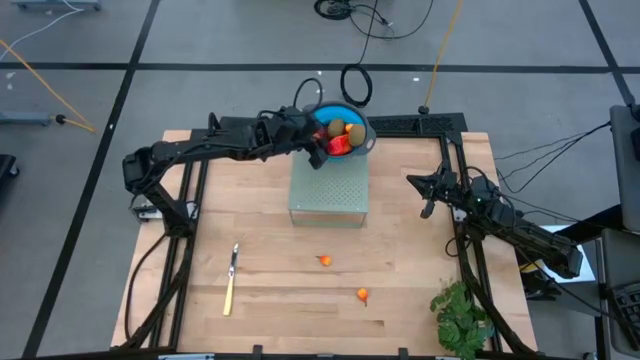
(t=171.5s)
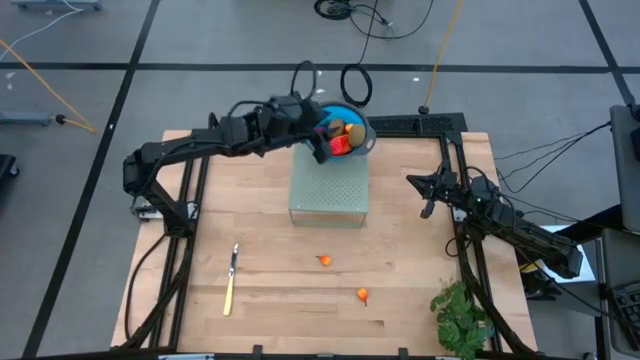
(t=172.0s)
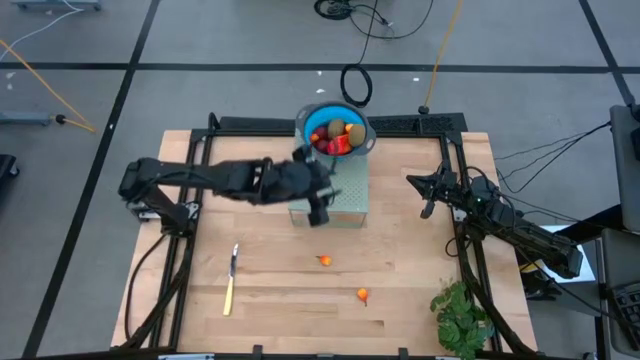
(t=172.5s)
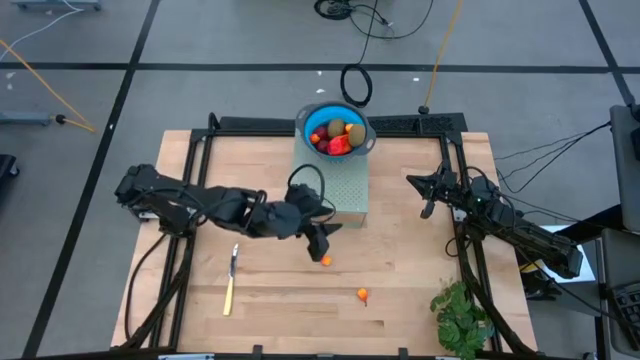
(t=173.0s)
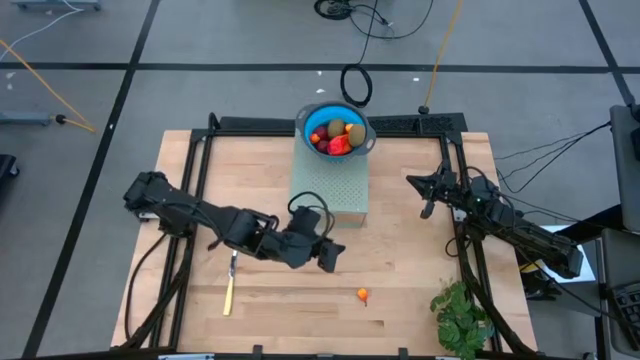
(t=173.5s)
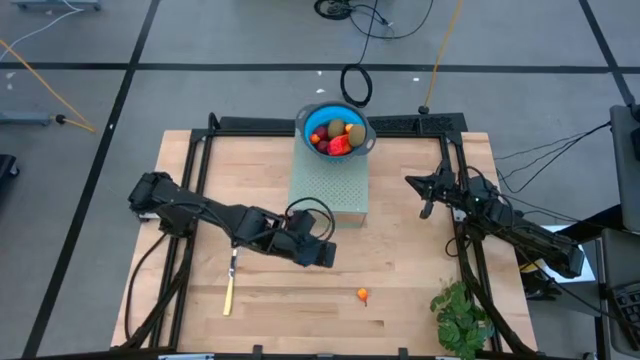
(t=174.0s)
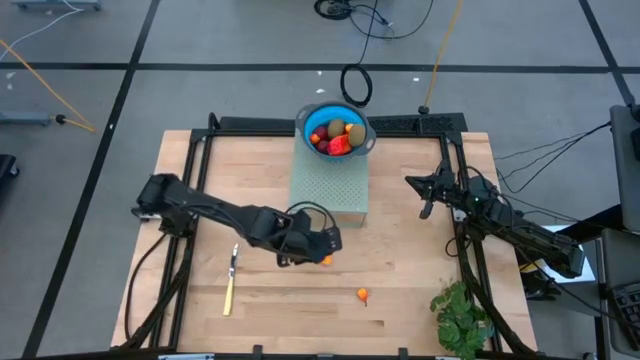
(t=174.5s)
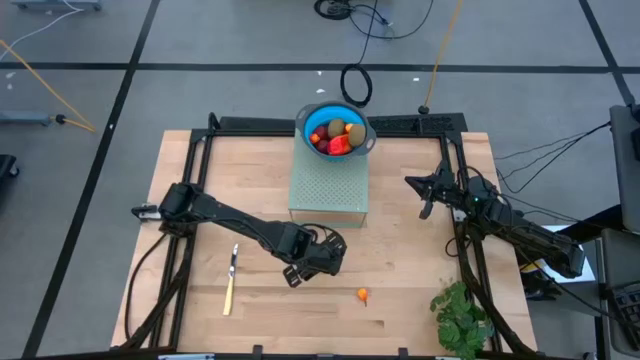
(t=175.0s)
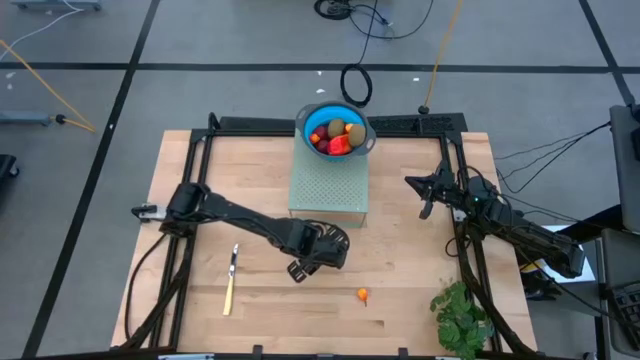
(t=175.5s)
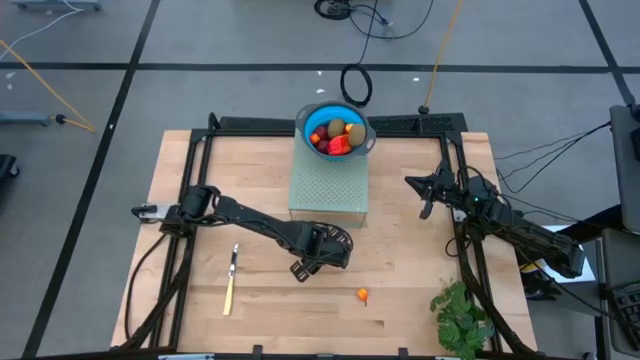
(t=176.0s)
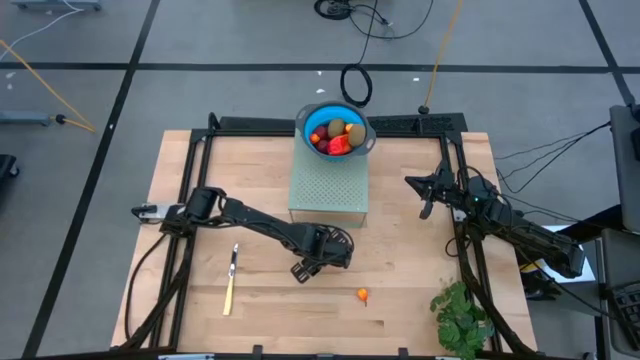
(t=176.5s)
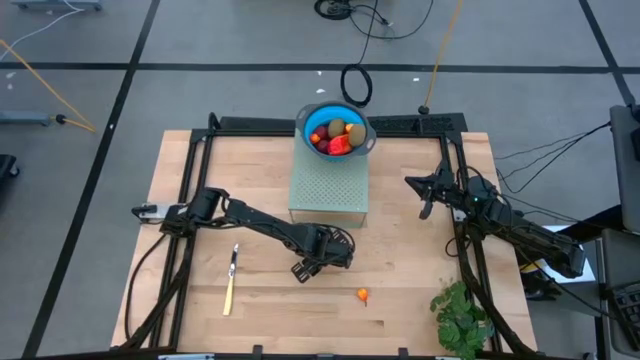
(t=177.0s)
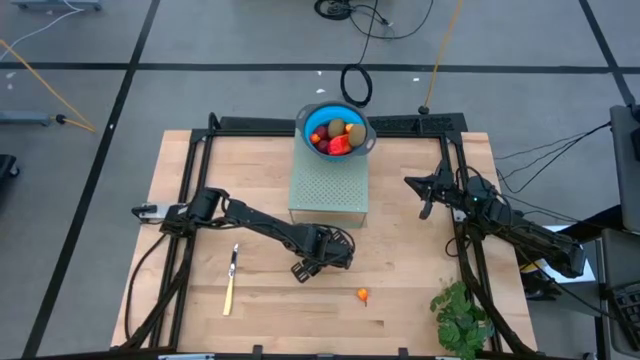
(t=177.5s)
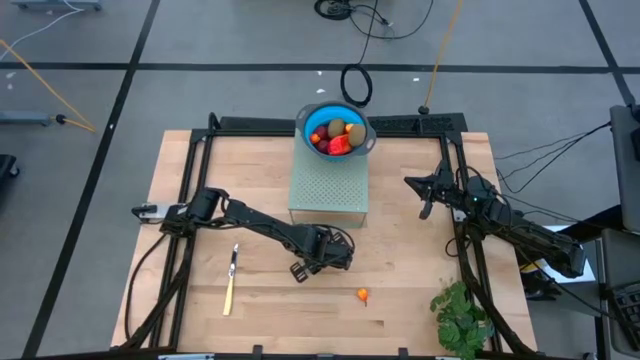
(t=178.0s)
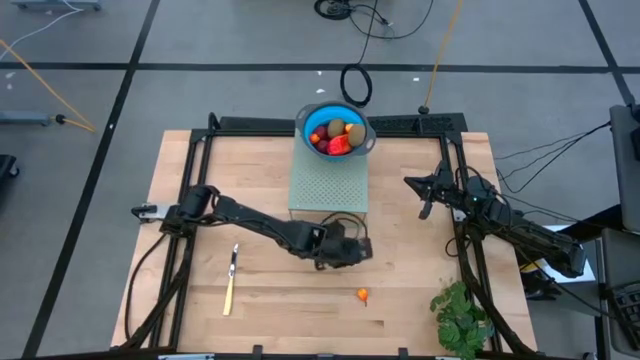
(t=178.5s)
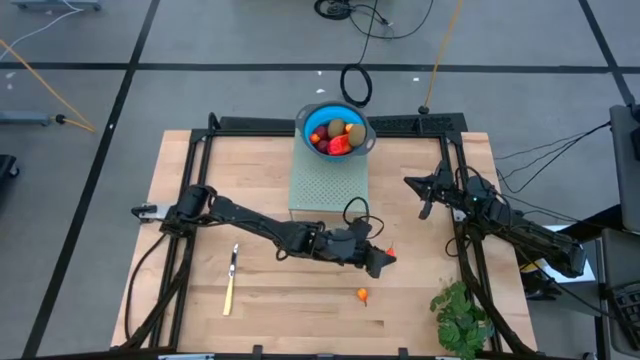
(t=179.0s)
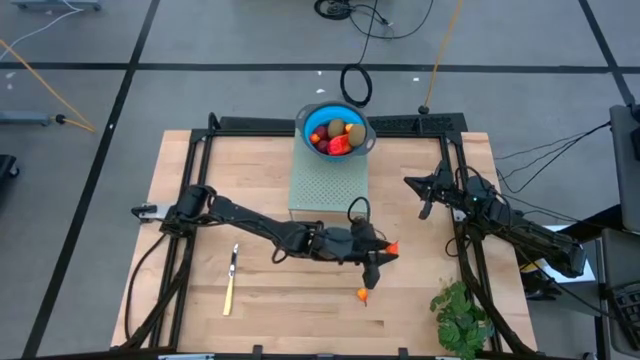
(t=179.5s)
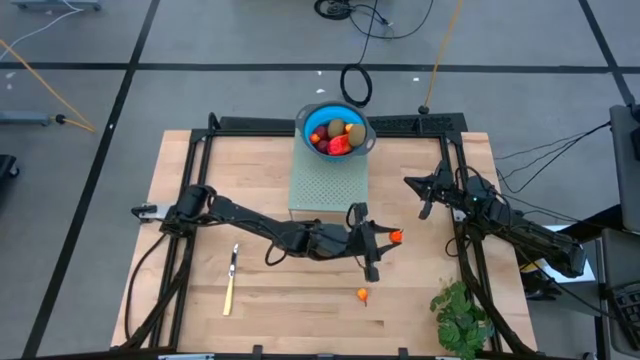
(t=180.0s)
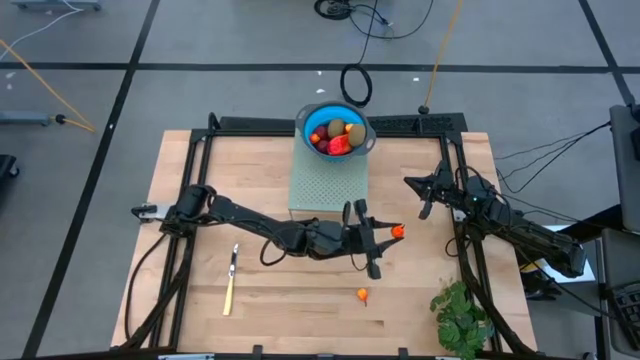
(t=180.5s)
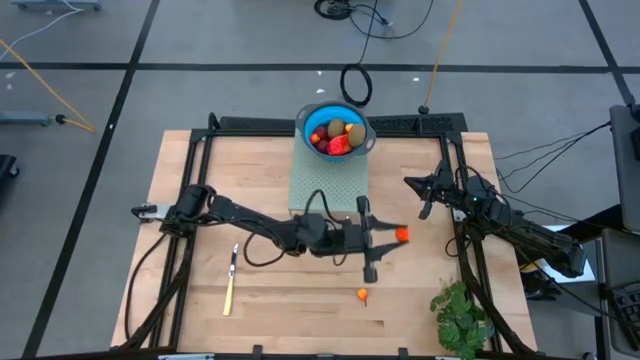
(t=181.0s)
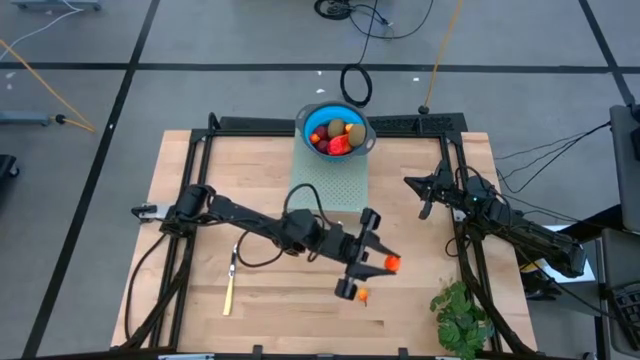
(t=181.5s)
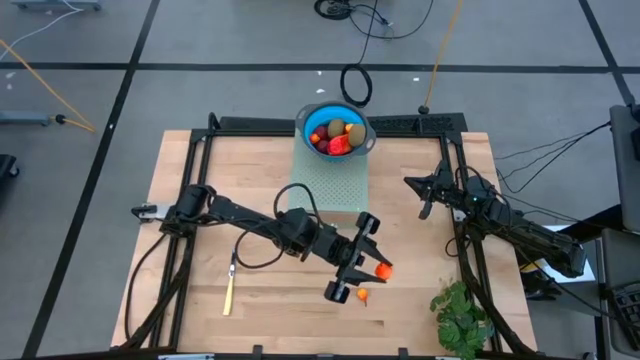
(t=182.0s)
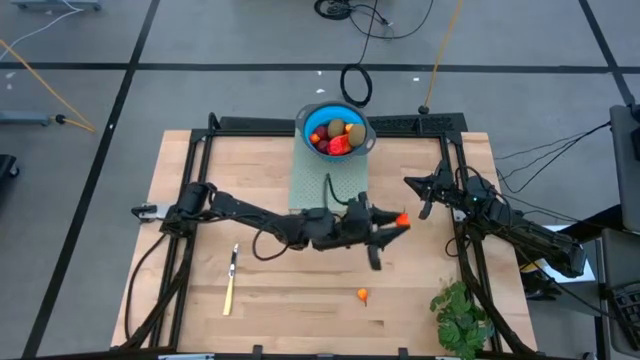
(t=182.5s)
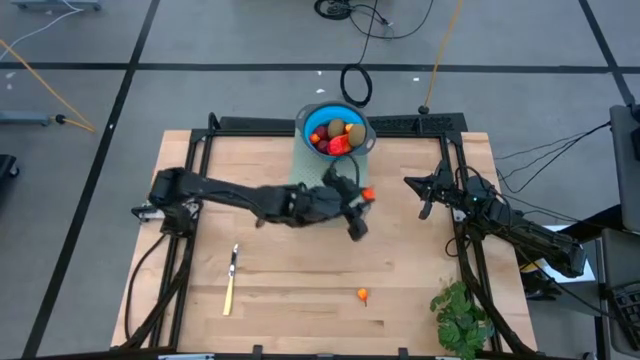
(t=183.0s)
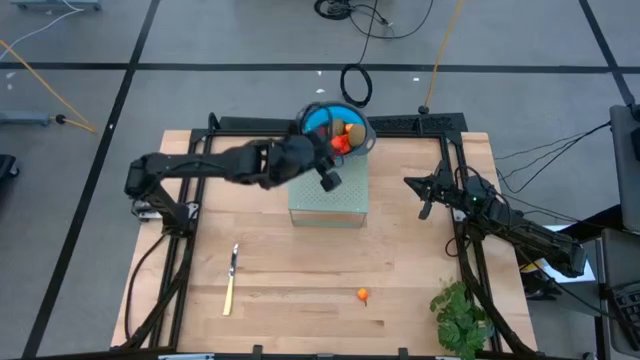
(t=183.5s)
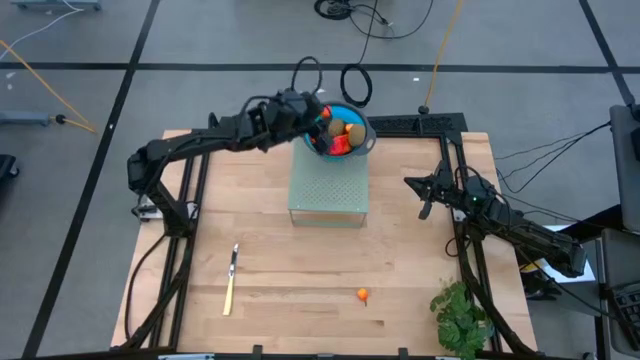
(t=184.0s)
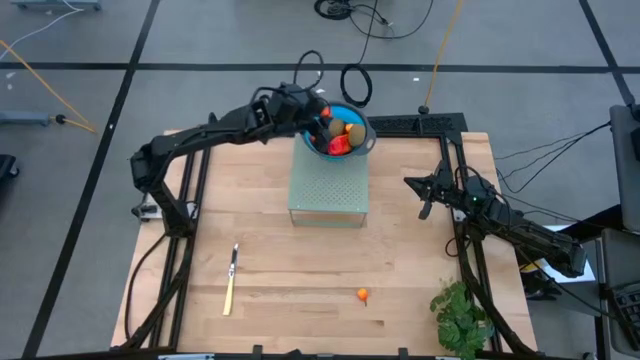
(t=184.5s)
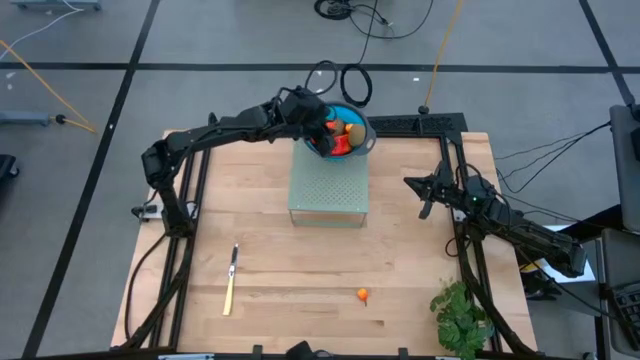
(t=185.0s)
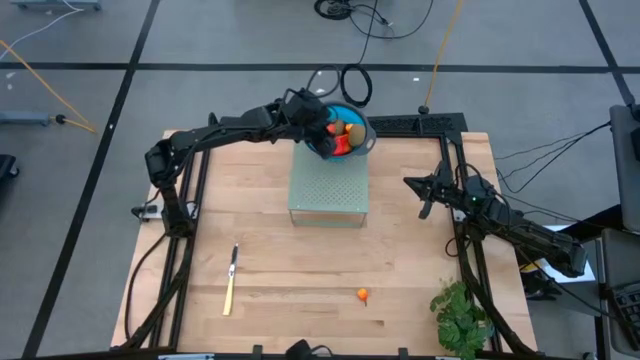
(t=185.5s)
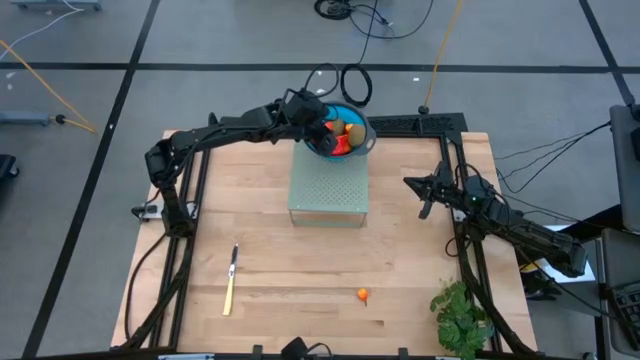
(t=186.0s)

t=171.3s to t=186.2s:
Task: Pick & Place Fruit
Put the peach into the blue strainer bowl on the shelf

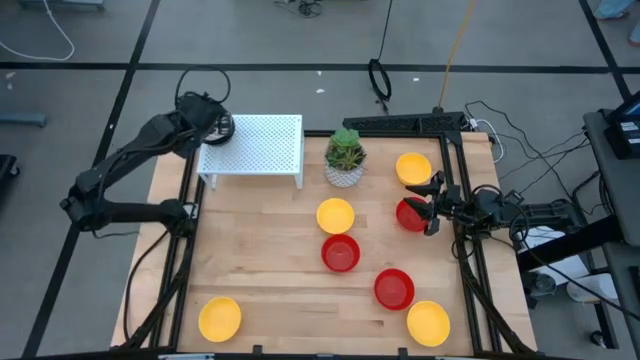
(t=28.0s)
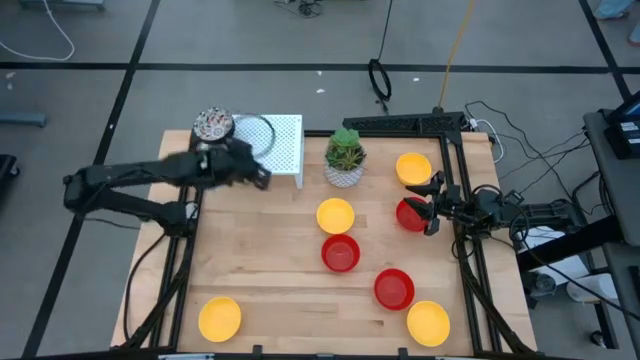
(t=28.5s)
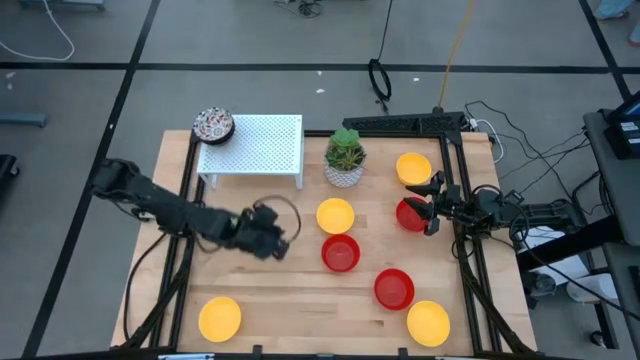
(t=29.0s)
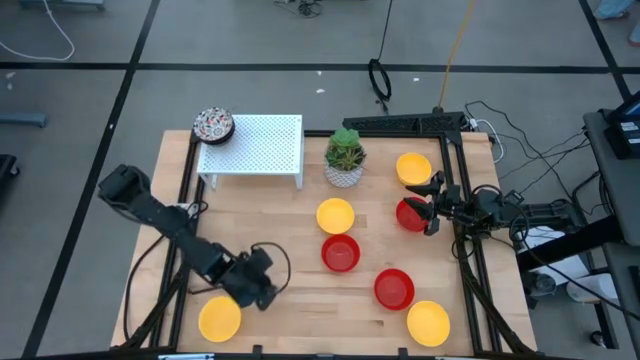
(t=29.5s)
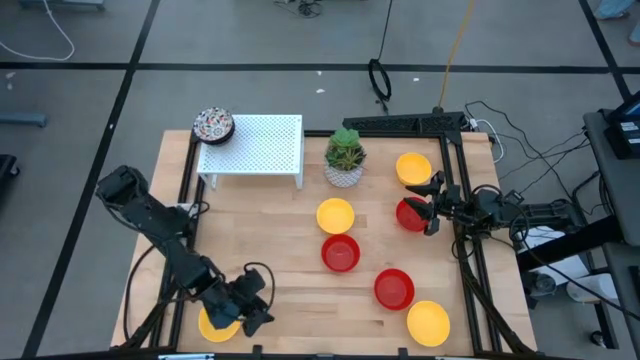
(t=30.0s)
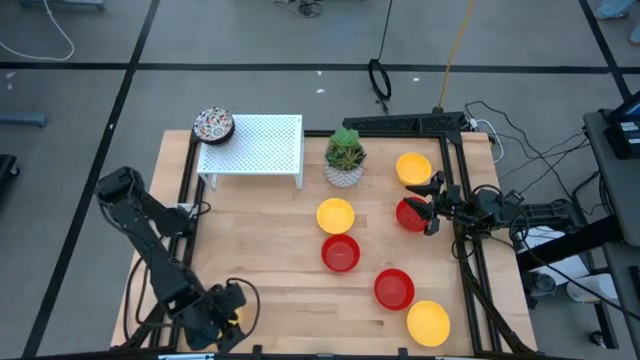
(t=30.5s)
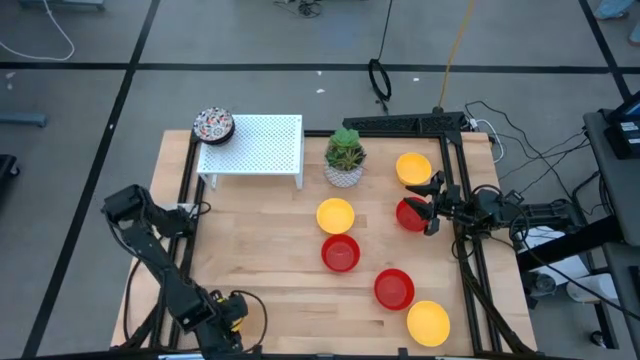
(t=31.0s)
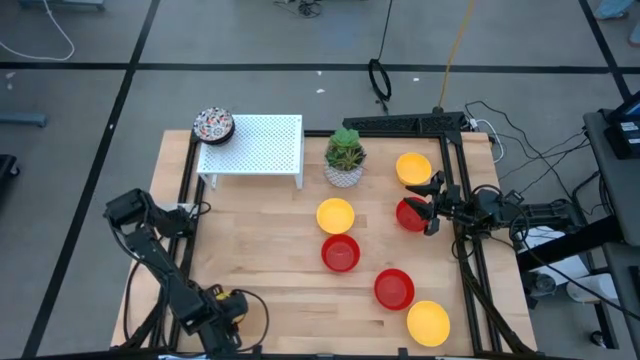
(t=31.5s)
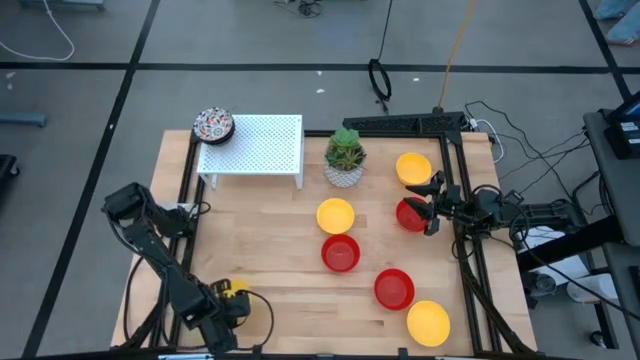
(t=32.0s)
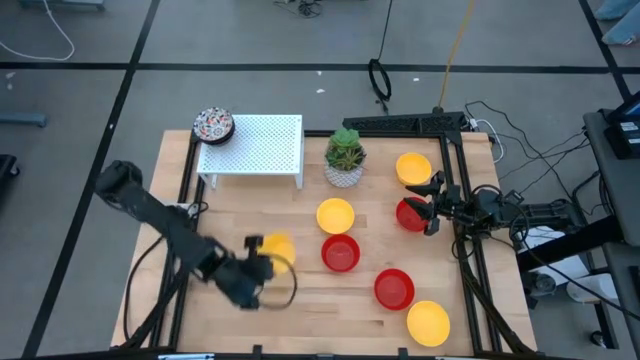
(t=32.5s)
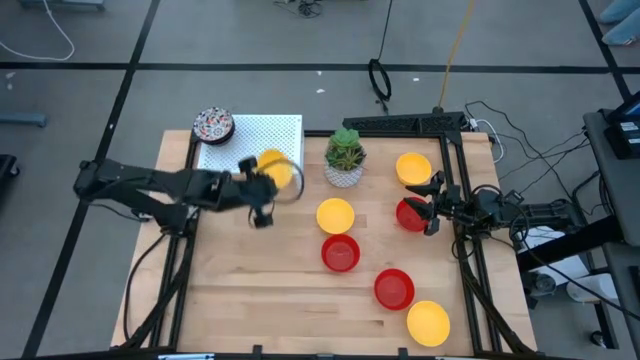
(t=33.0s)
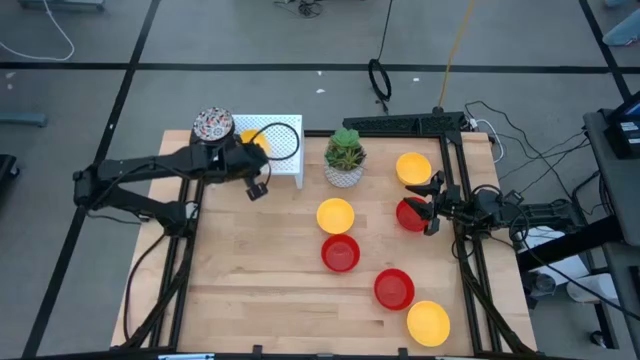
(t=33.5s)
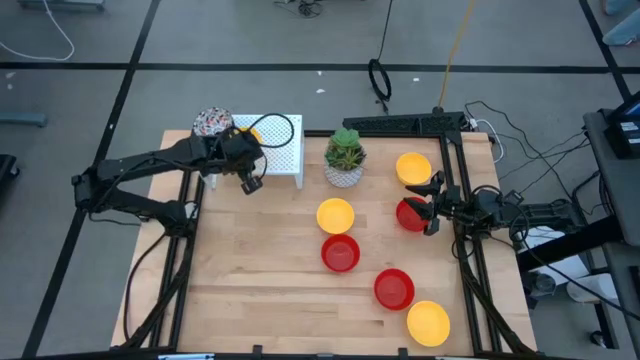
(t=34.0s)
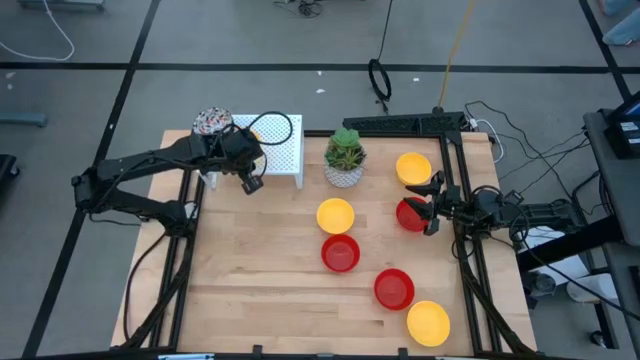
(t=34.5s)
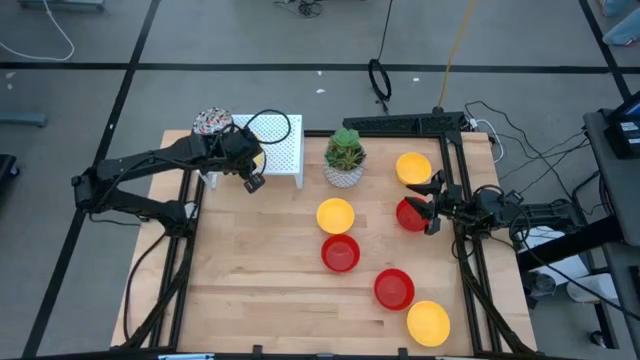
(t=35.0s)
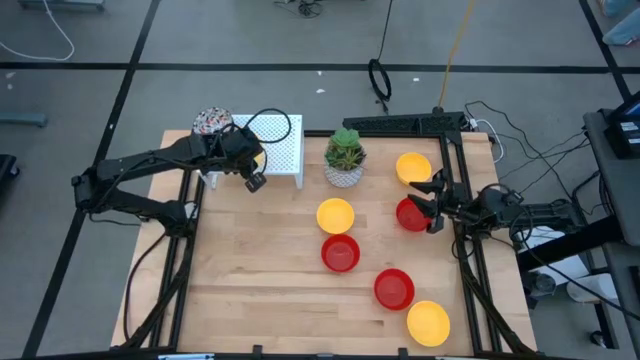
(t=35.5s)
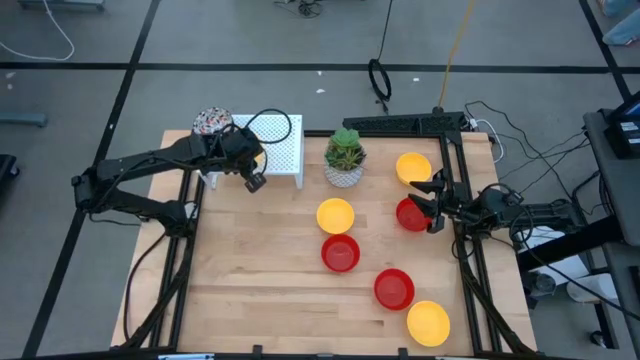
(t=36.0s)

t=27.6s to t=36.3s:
Task: Pick & Place Mini bowls
Put the yellow bowl on the shelf
